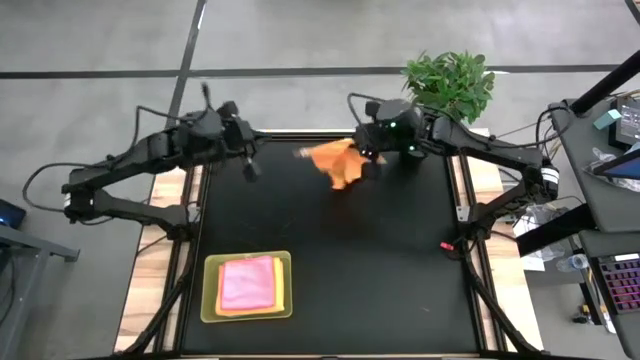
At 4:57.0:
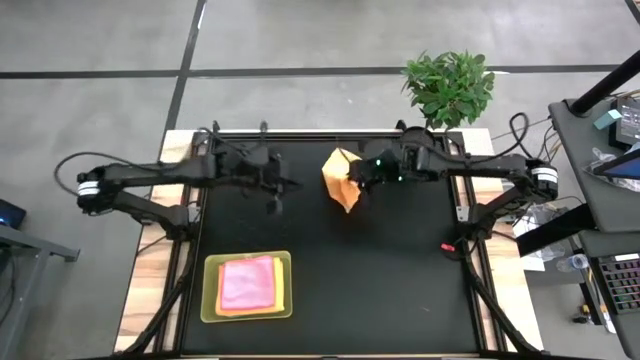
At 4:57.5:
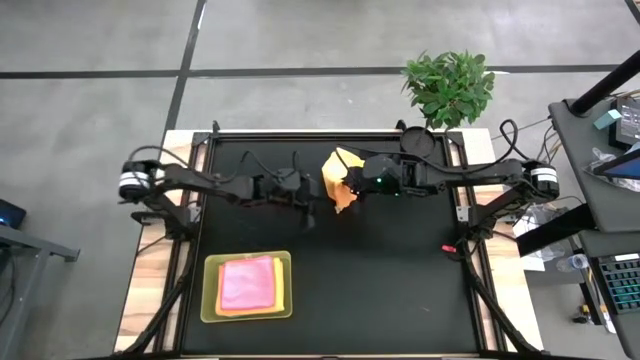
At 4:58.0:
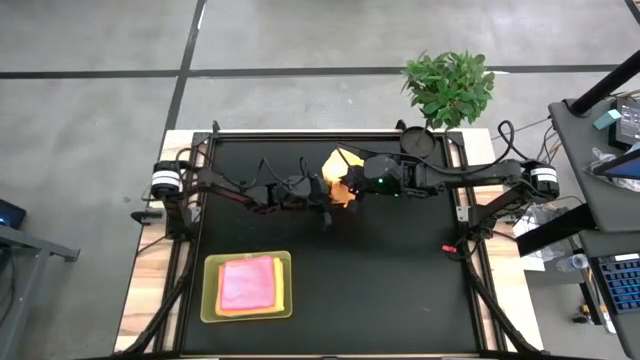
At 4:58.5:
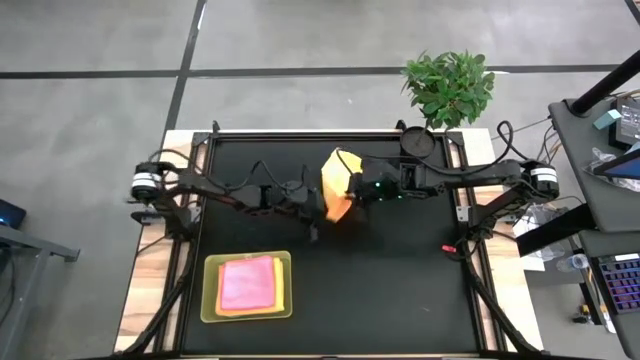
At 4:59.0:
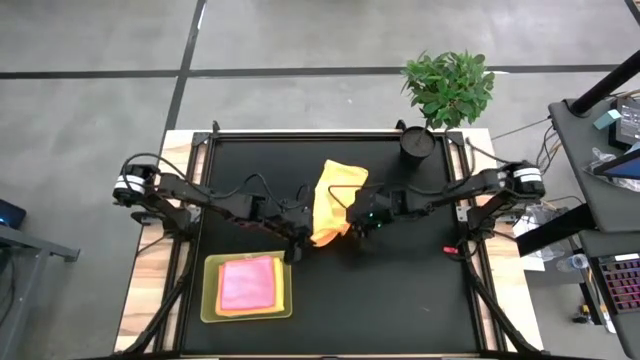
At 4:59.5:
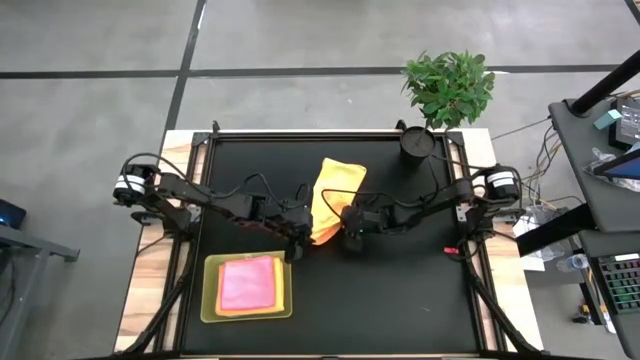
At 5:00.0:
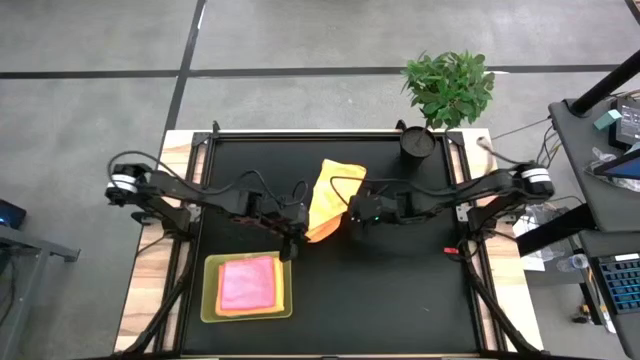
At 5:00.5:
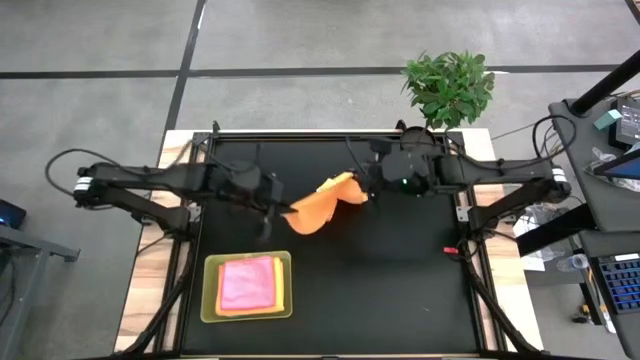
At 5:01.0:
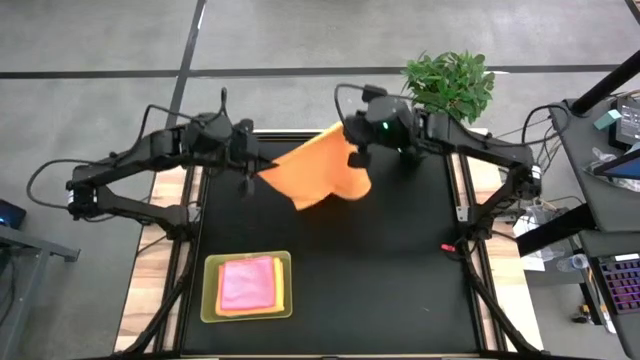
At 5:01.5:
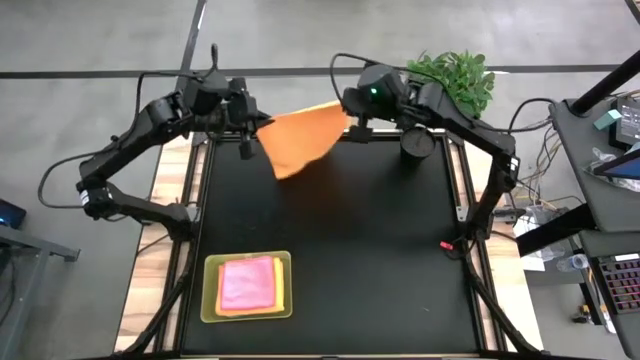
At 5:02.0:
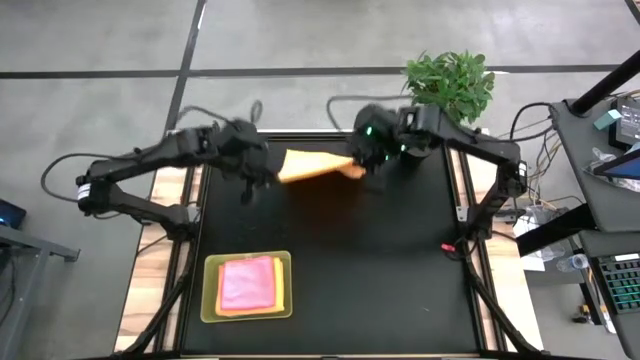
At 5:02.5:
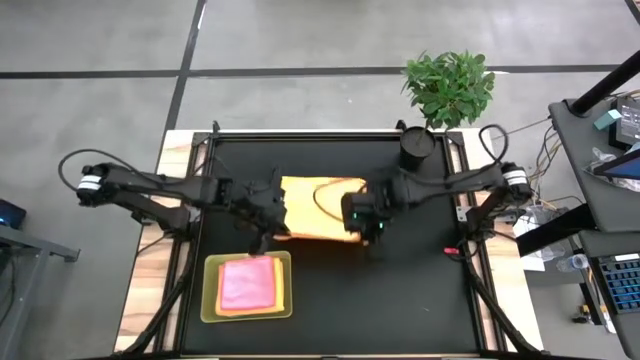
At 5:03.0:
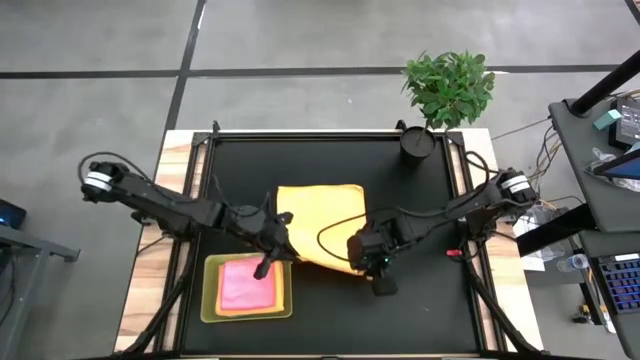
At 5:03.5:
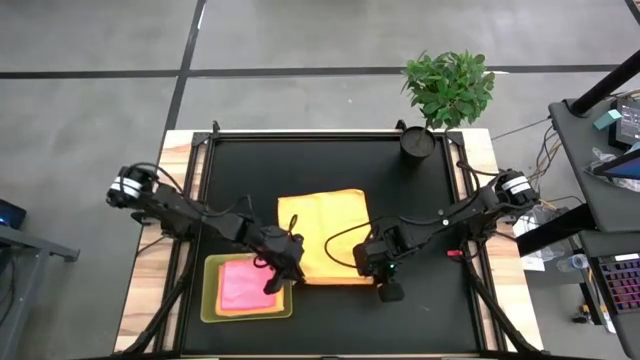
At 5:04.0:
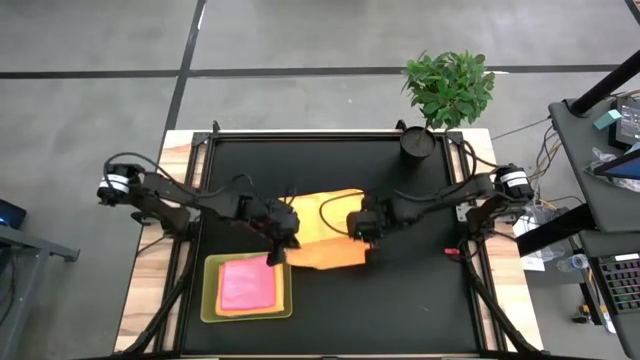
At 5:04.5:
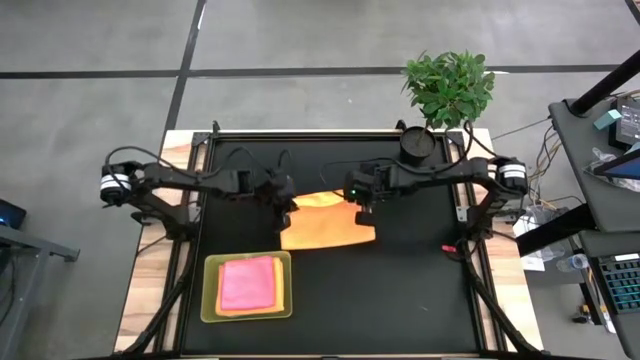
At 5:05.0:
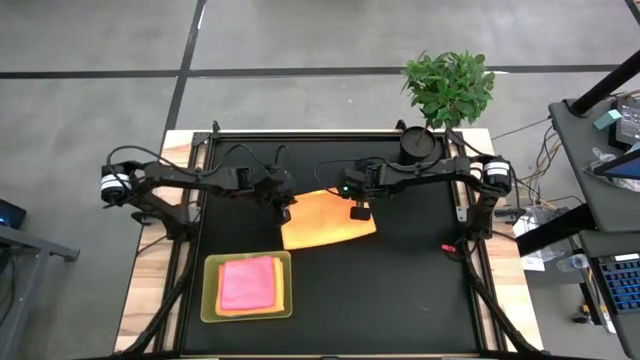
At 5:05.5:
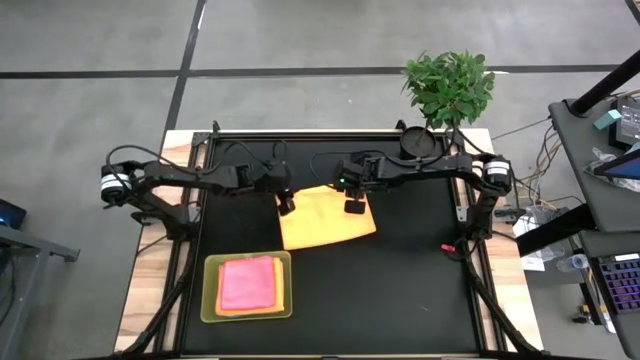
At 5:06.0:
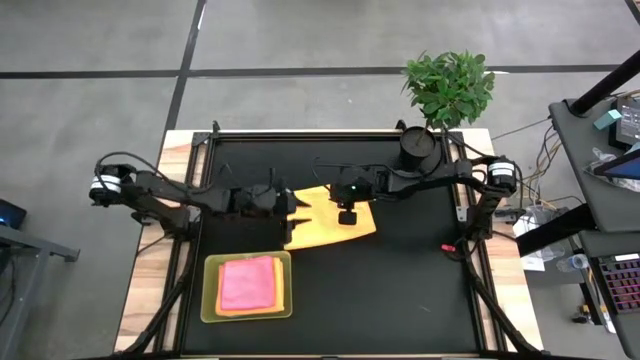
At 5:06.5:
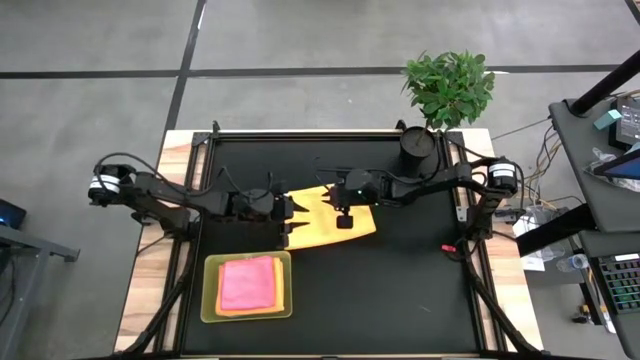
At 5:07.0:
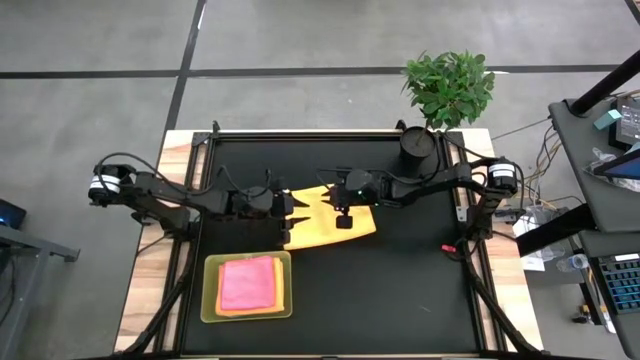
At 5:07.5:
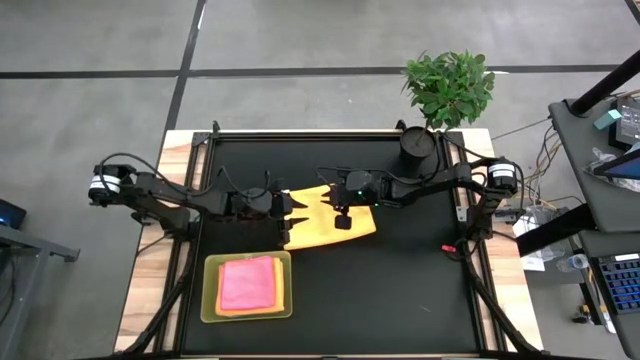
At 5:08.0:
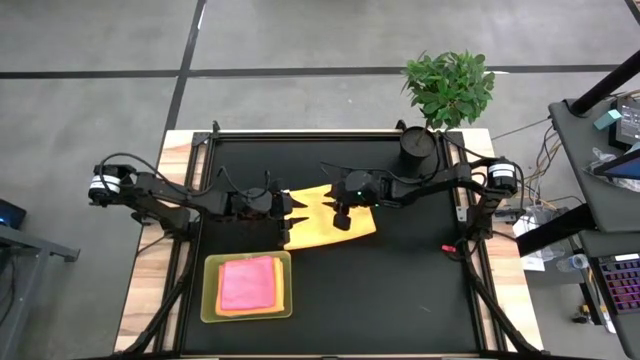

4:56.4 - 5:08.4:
Task: Fold microfiber towels
Fold the orange microfiber towel

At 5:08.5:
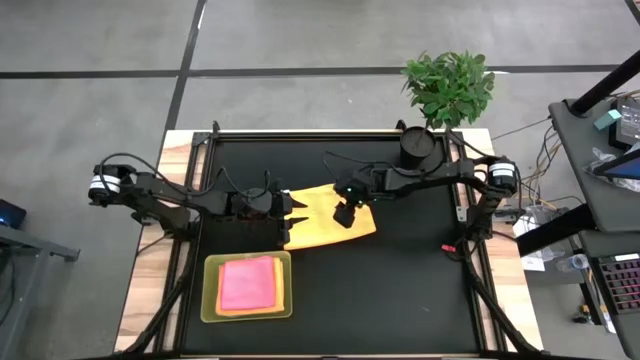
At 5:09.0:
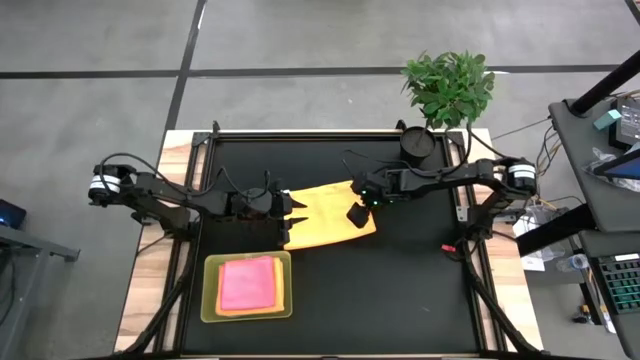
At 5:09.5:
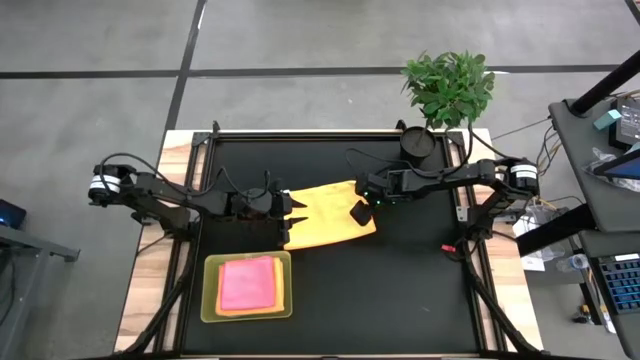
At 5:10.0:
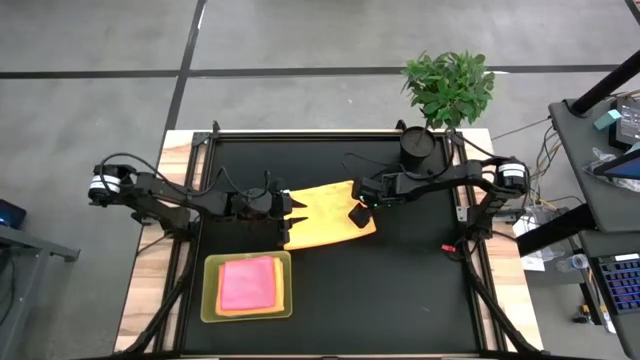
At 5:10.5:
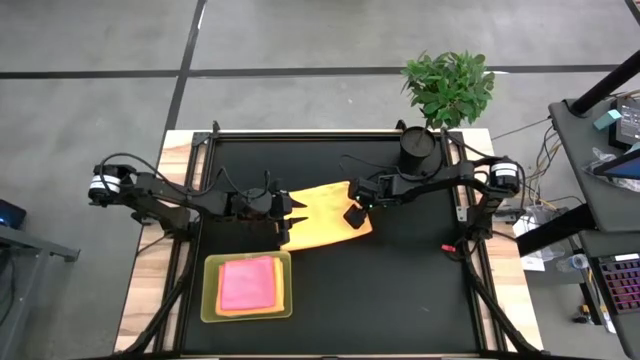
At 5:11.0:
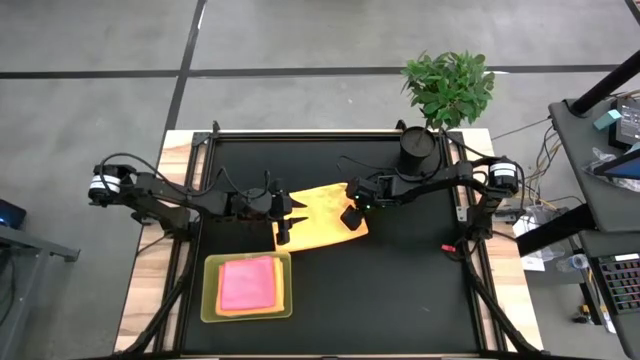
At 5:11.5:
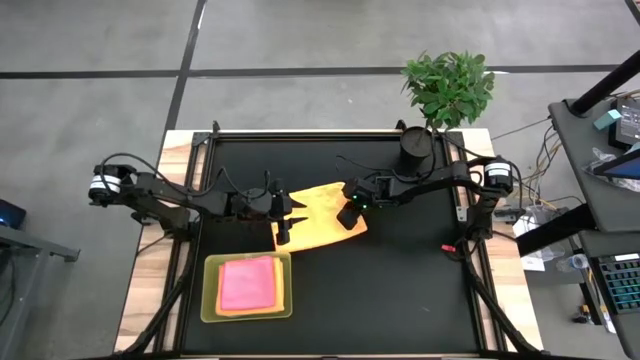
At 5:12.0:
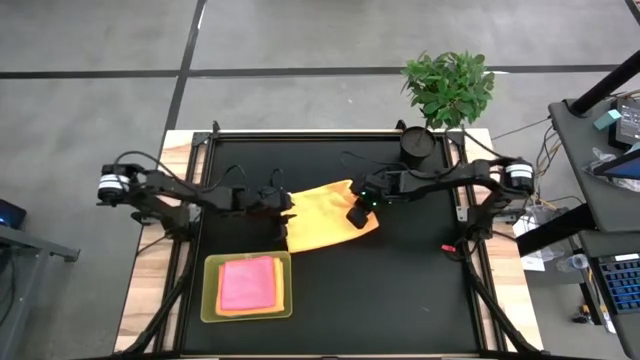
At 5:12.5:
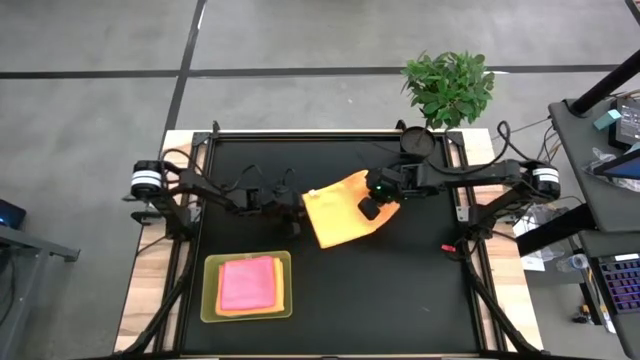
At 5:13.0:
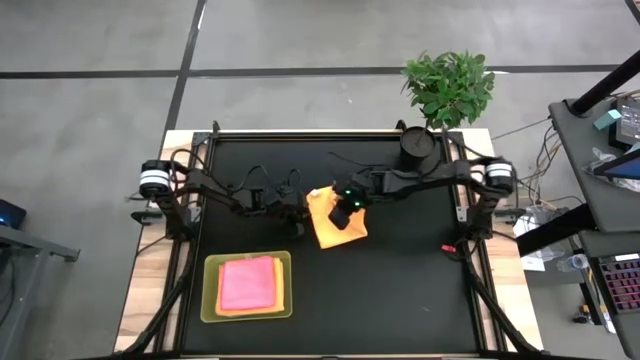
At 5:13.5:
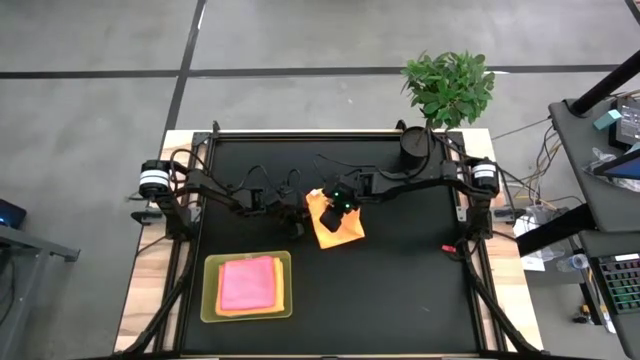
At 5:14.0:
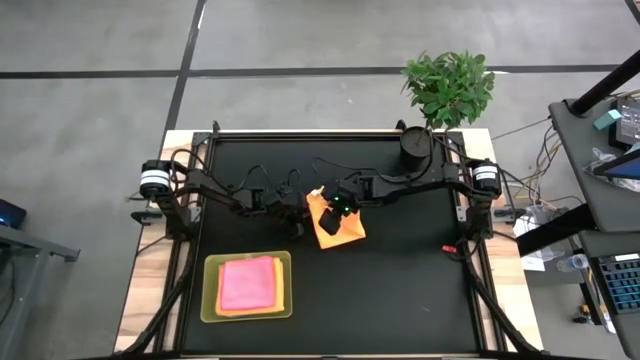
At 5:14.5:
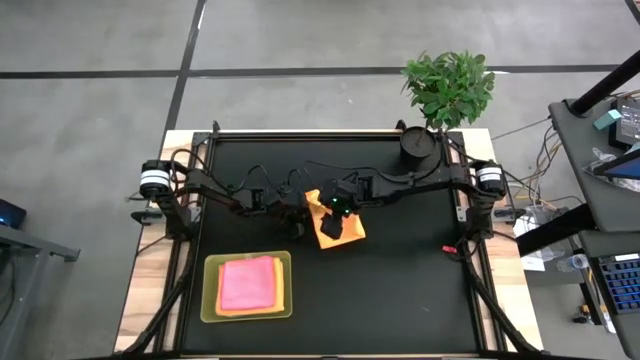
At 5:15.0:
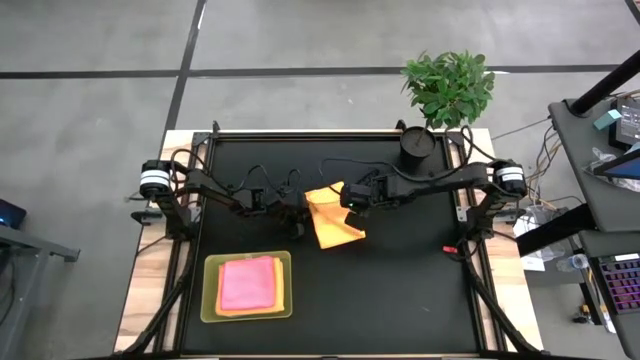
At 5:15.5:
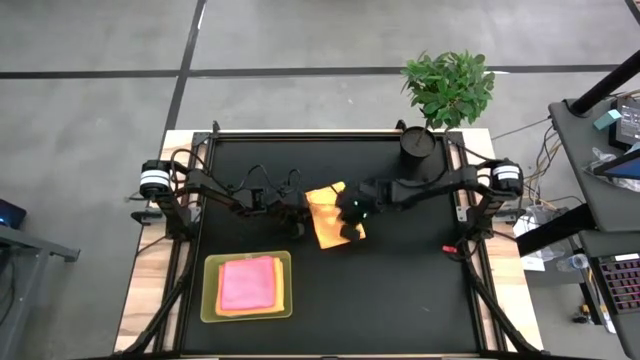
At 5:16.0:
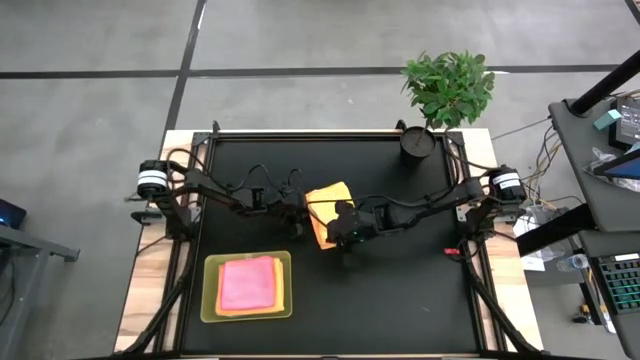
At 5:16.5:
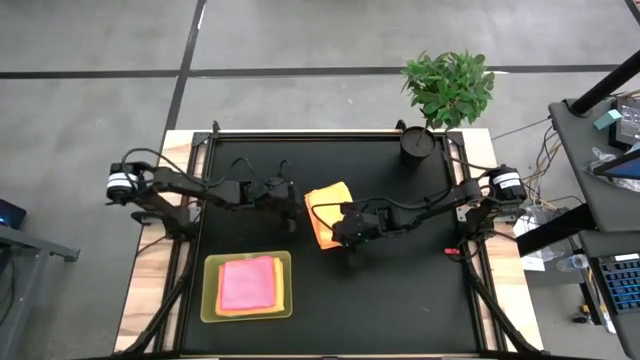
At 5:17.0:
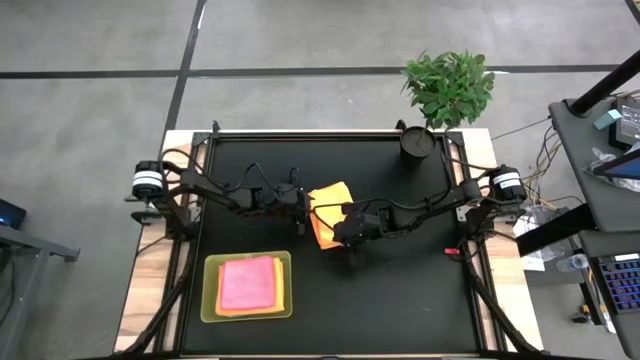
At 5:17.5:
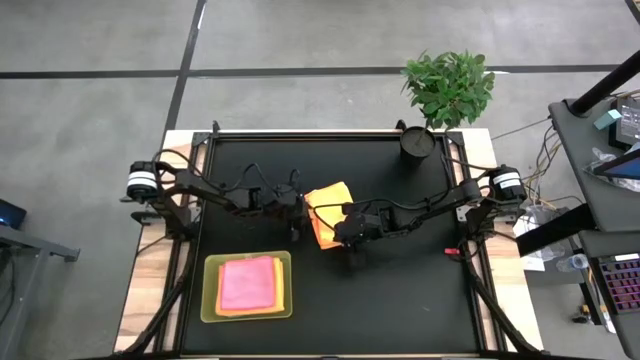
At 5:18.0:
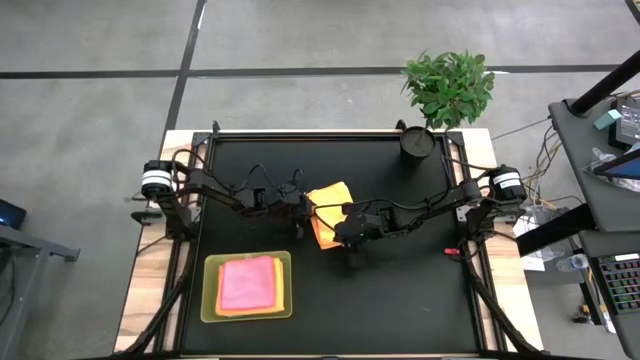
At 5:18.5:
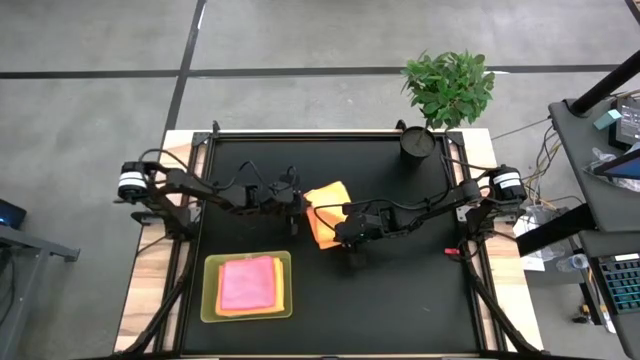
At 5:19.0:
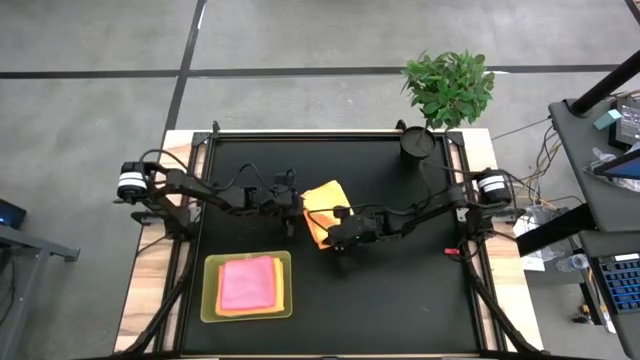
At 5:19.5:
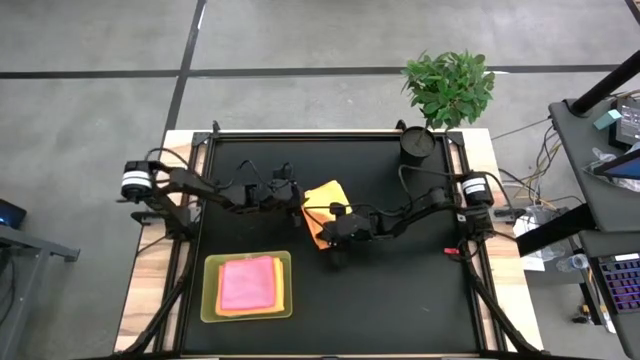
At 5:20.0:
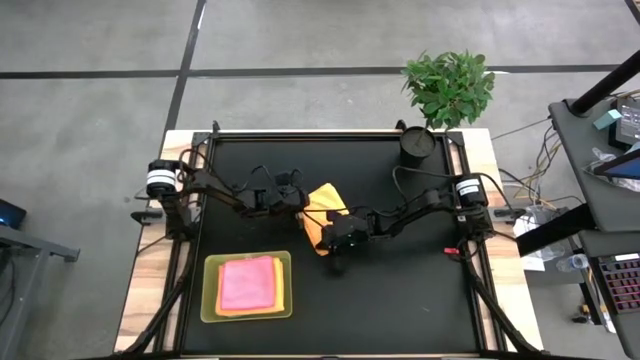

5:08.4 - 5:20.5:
Fold the orange microfiber towel
